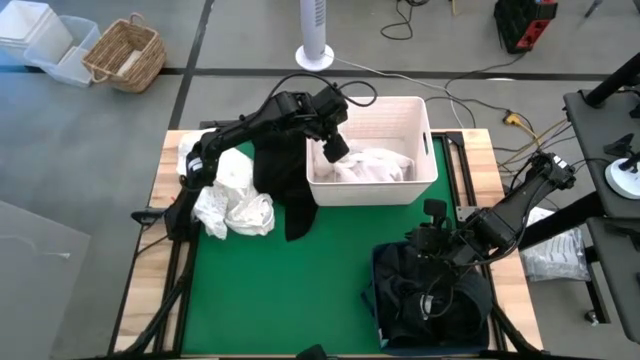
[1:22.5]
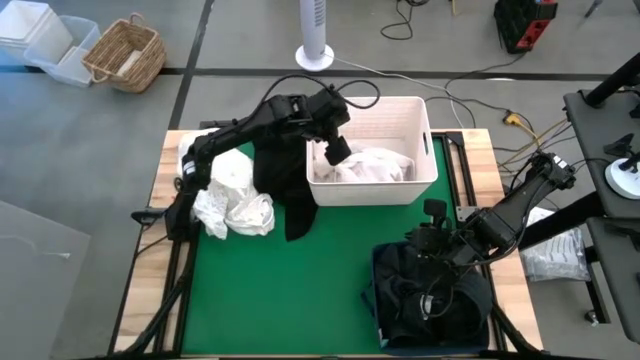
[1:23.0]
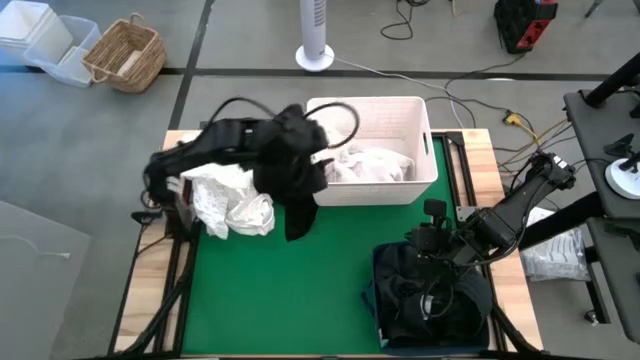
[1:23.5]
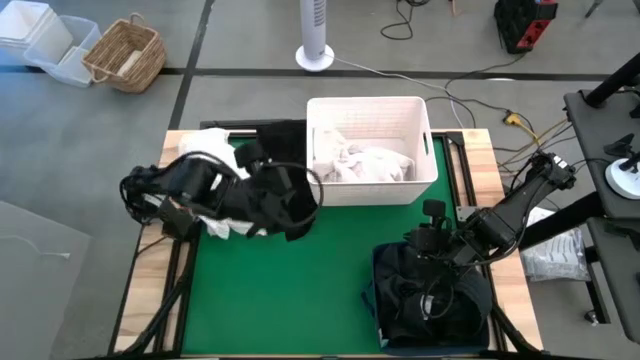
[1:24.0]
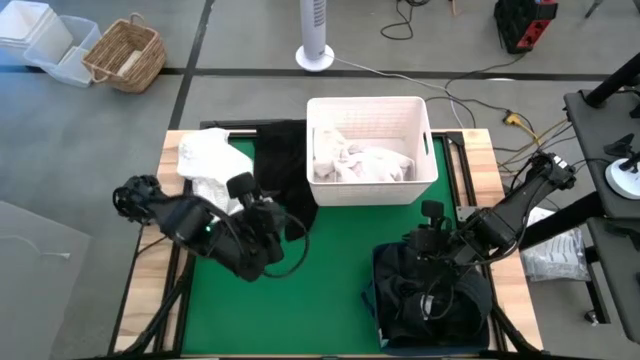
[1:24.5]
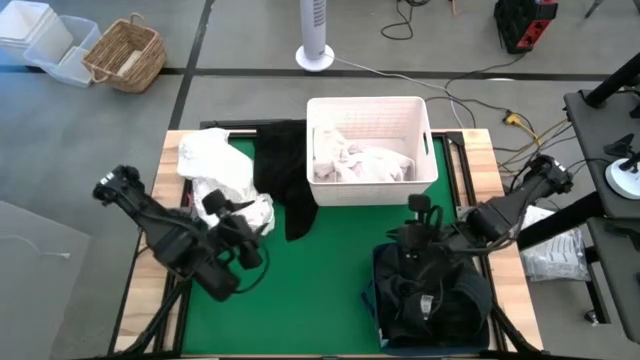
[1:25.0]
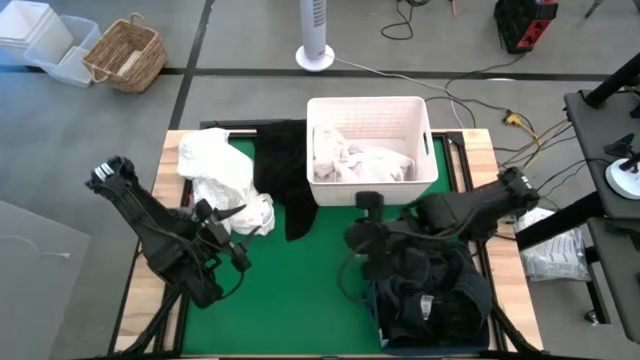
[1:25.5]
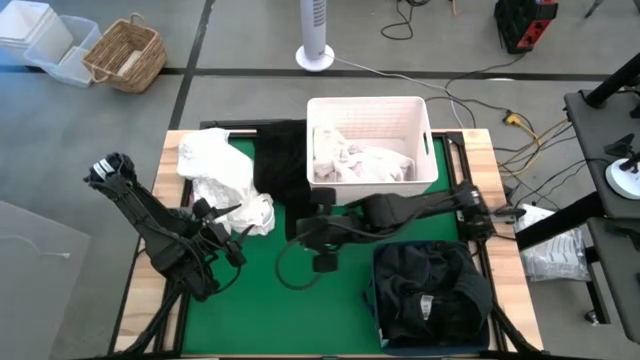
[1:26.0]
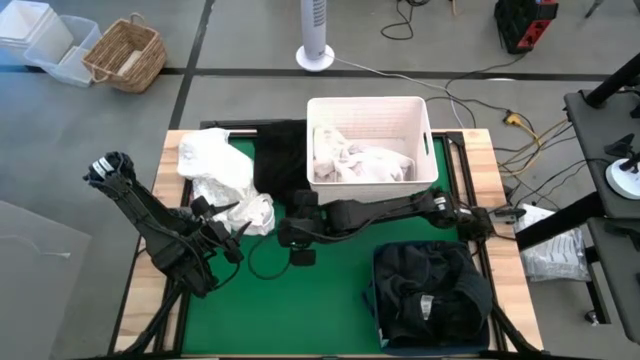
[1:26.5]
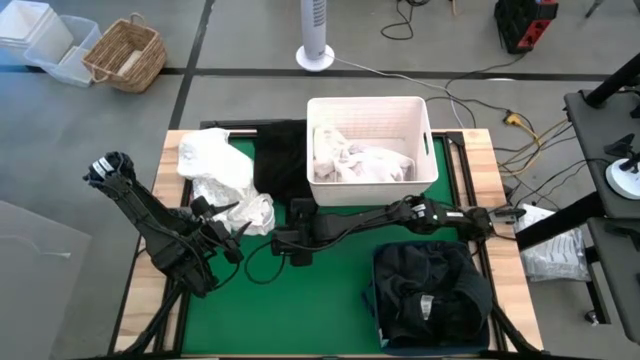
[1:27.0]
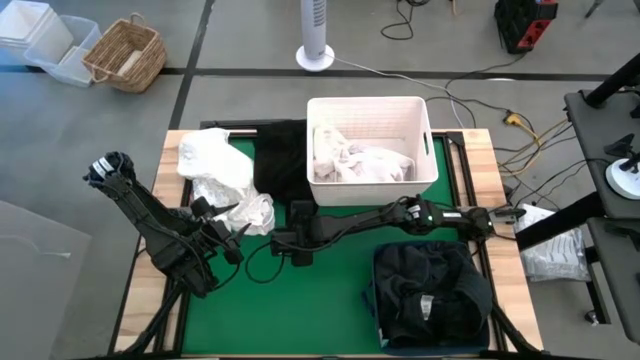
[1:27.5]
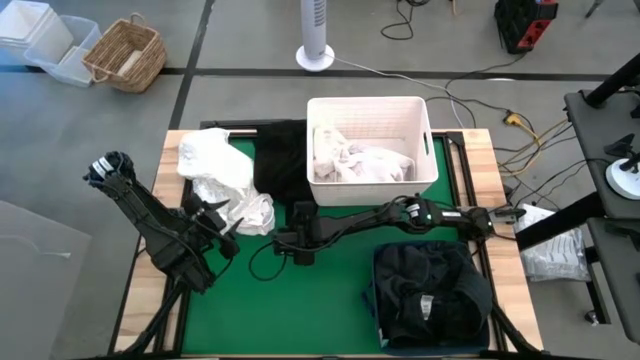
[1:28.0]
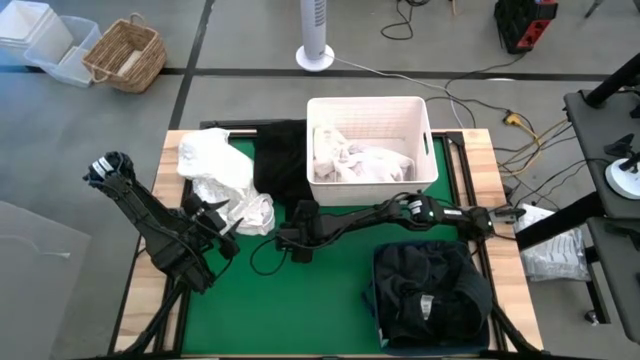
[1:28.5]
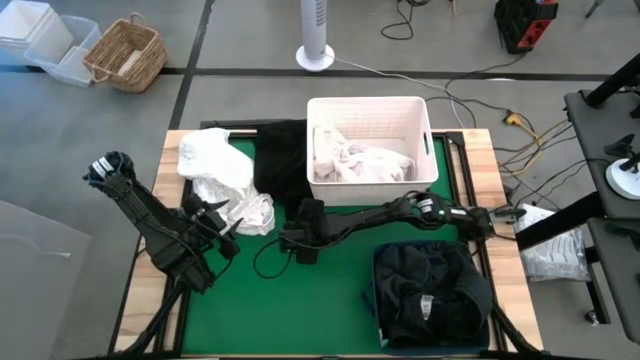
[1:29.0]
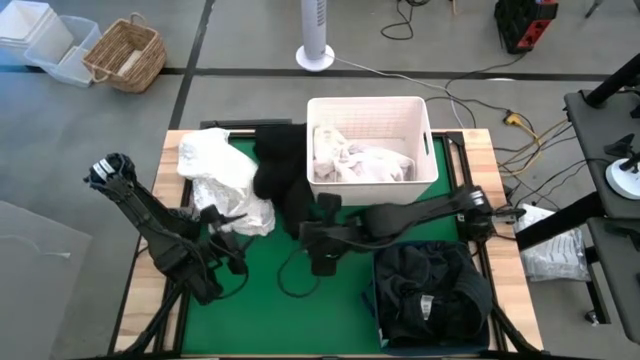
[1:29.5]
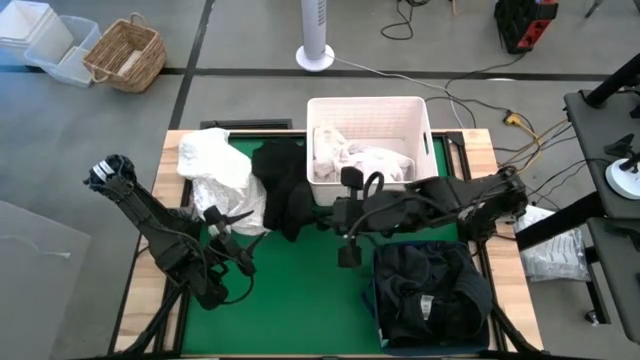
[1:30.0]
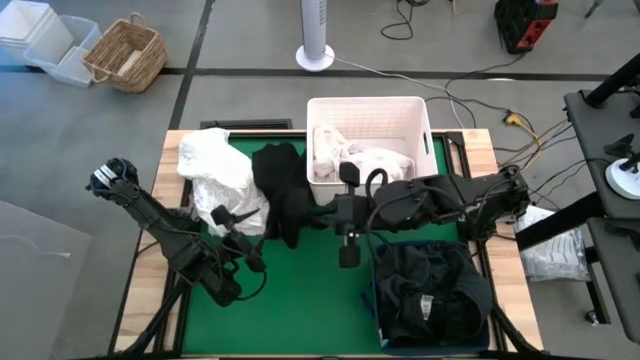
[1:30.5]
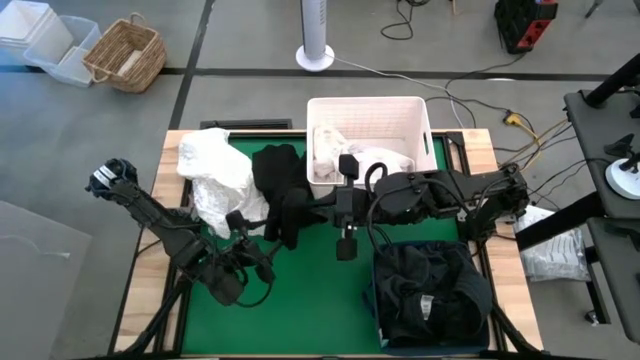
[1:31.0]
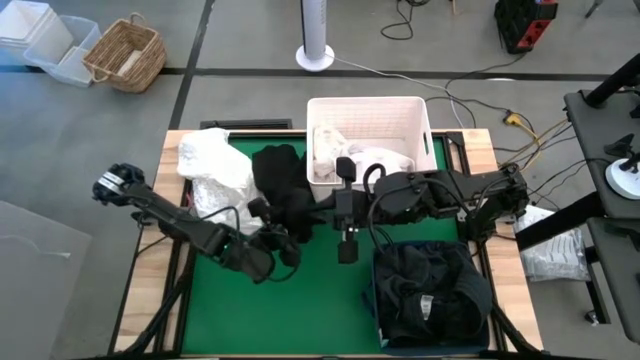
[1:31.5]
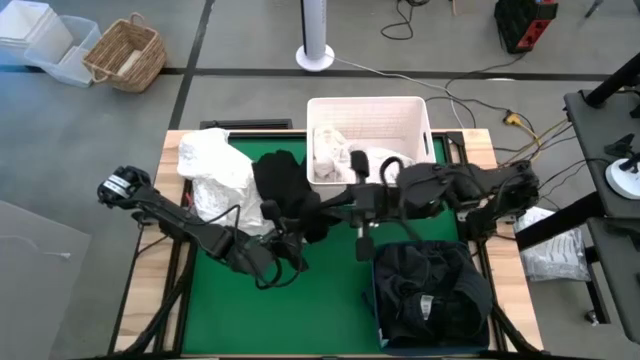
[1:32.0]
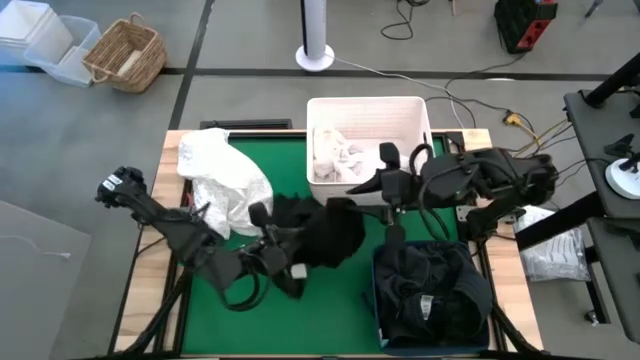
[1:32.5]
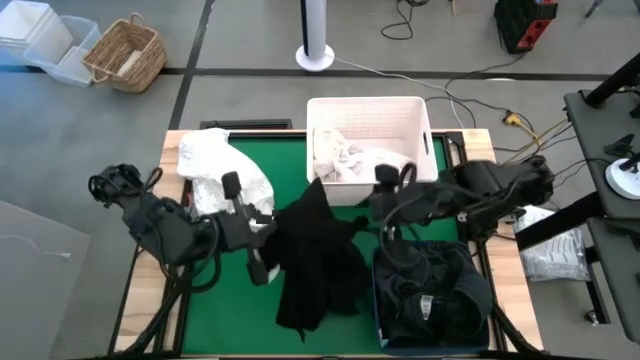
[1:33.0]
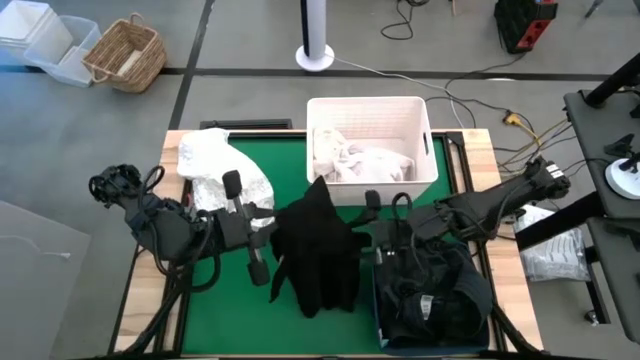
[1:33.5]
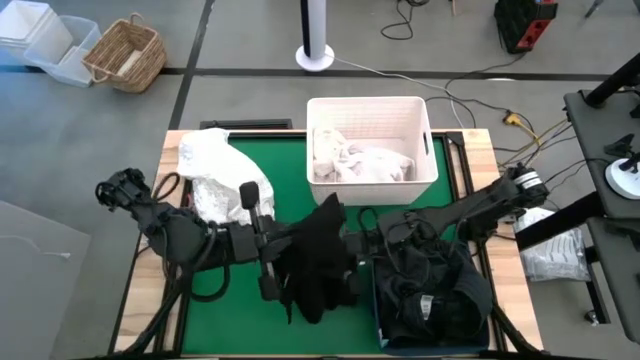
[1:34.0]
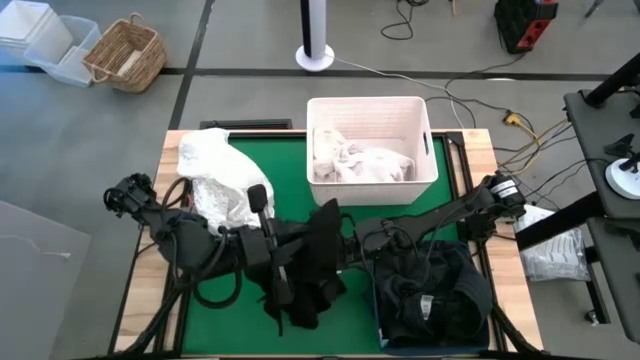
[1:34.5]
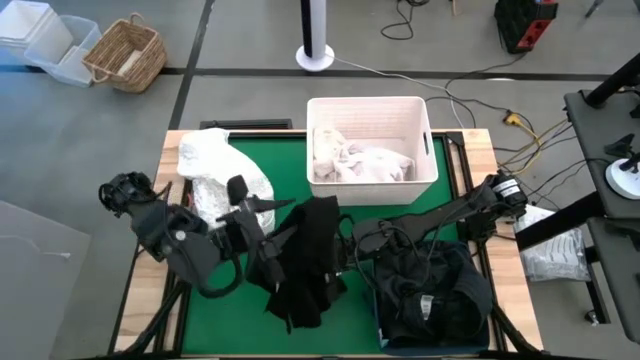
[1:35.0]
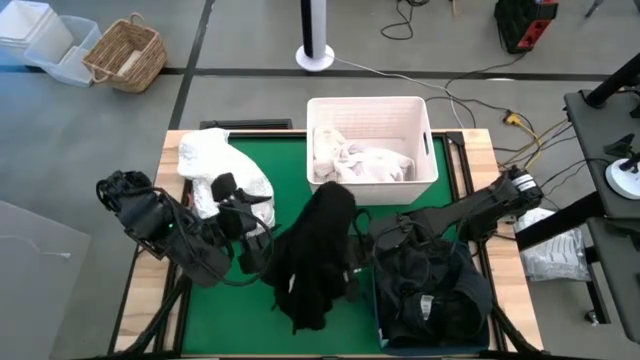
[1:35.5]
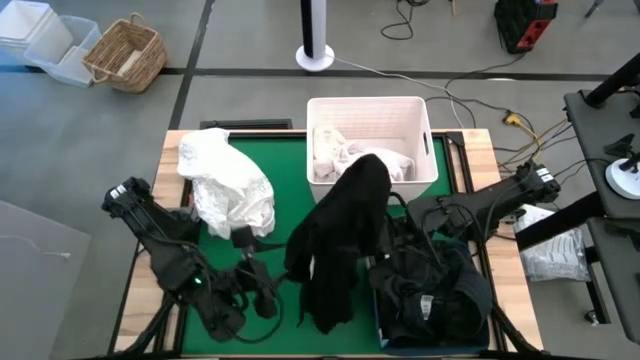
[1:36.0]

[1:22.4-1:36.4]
Put the black shirt into the blue laundry bin

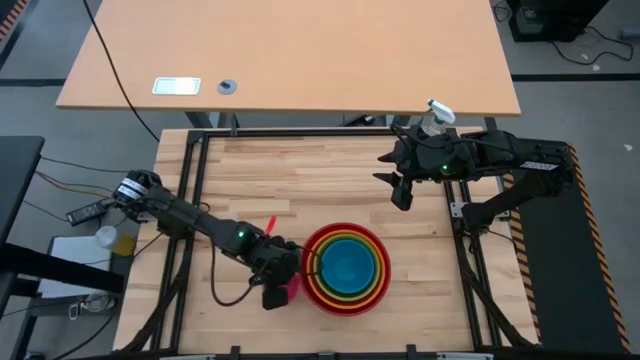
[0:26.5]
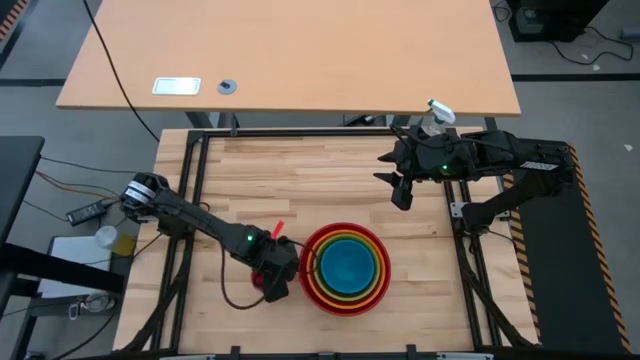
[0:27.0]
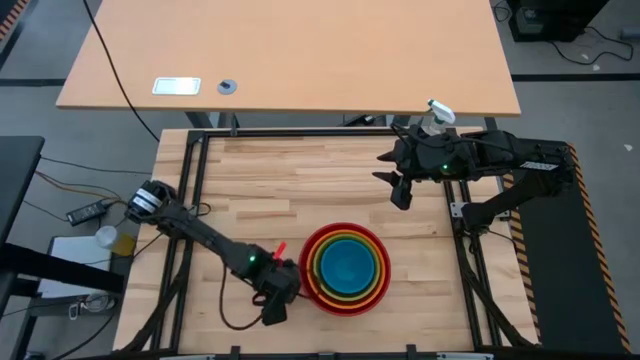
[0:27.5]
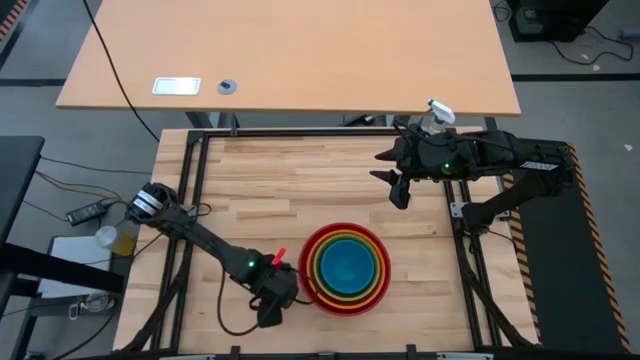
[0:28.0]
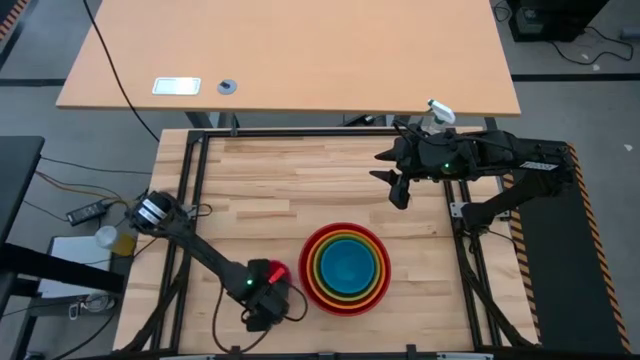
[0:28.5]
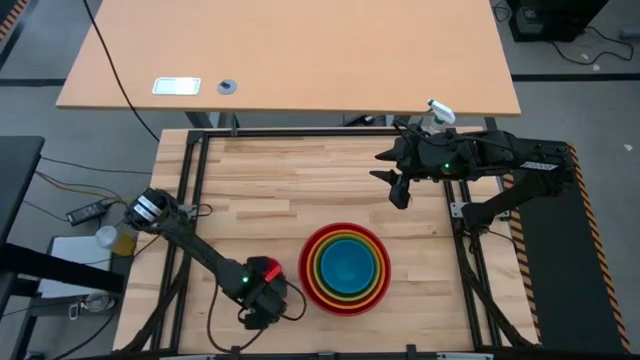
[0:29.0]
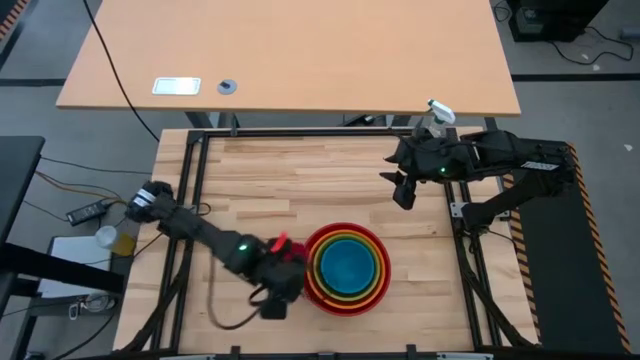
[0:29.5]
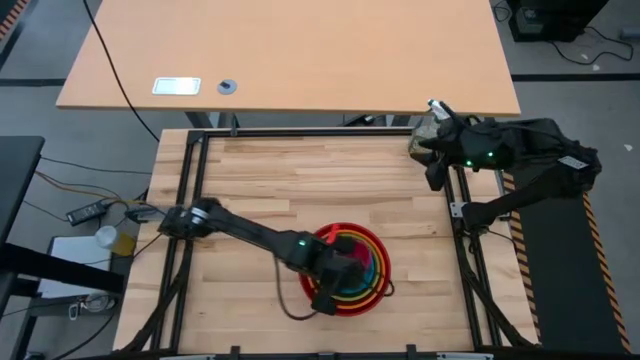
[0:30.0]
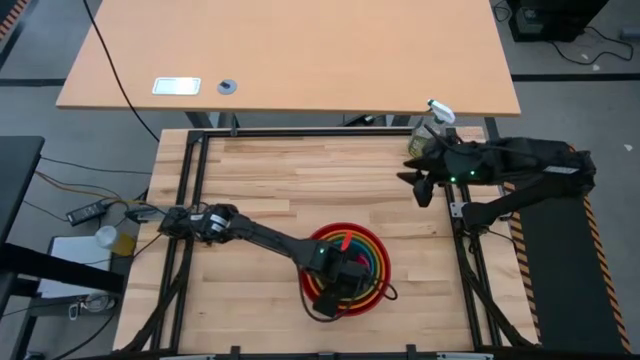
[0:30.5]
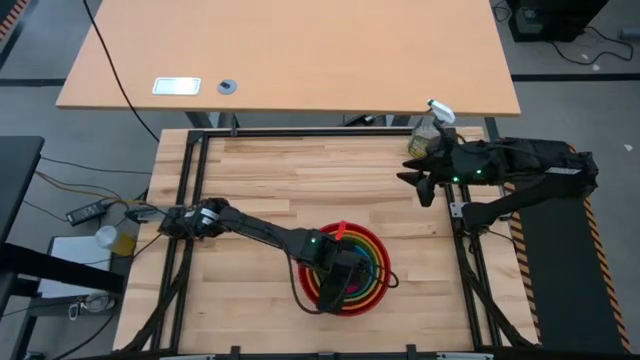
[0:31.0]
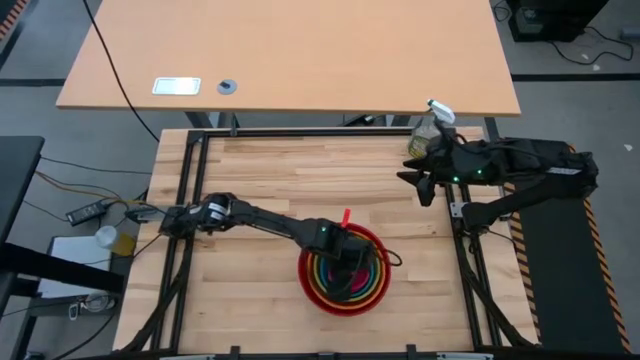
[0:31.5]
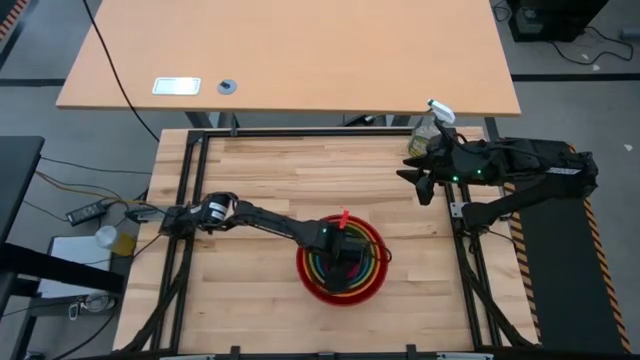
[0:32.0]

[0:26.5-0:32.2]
Stack the pink bowl on top of the blue bowl
